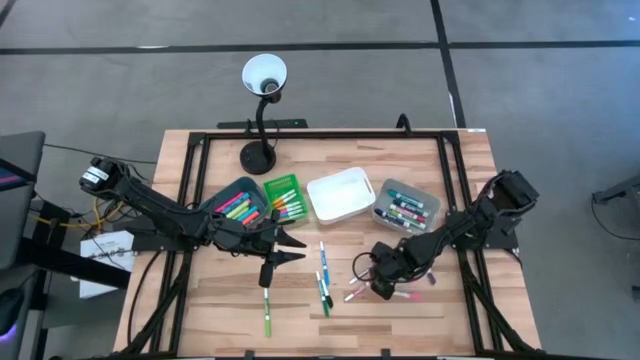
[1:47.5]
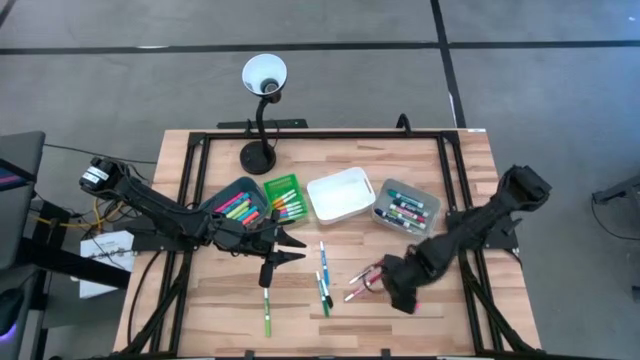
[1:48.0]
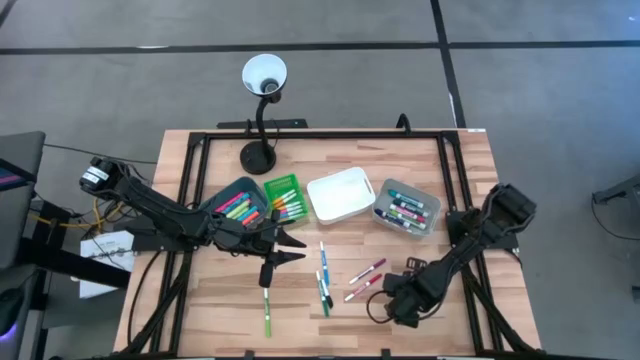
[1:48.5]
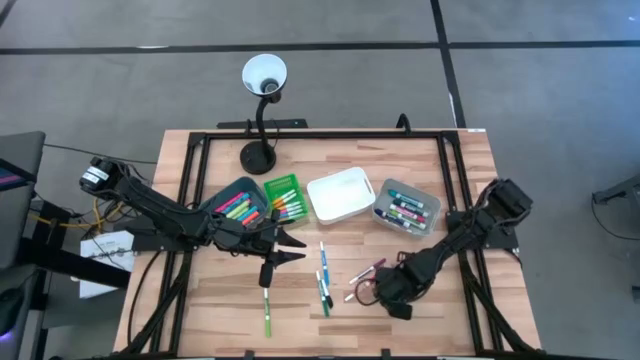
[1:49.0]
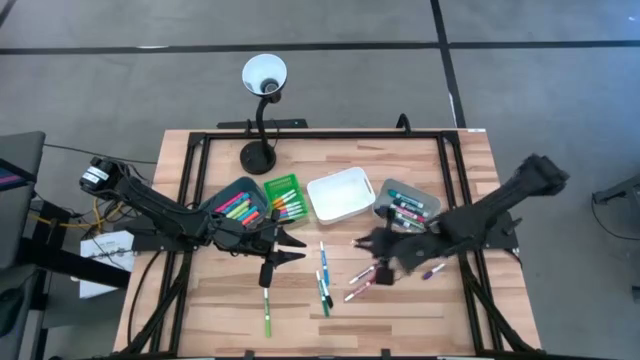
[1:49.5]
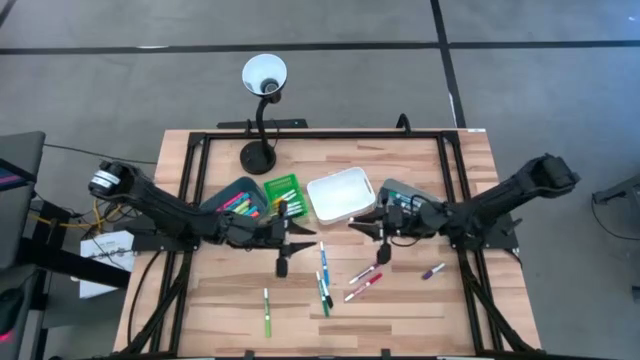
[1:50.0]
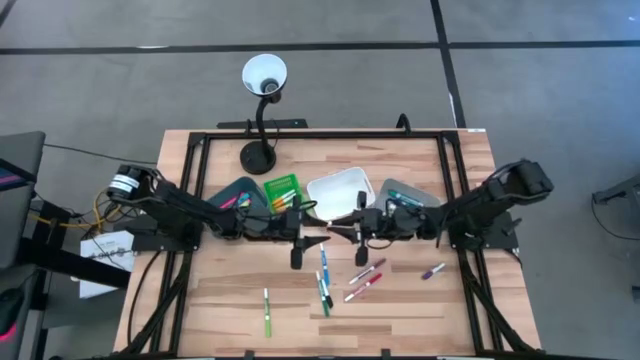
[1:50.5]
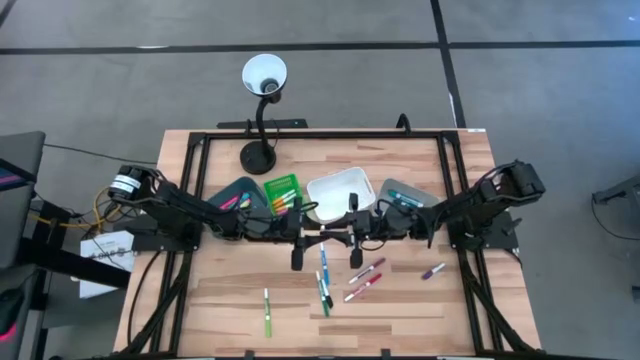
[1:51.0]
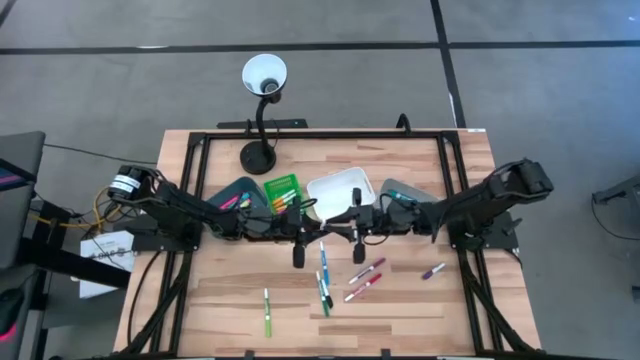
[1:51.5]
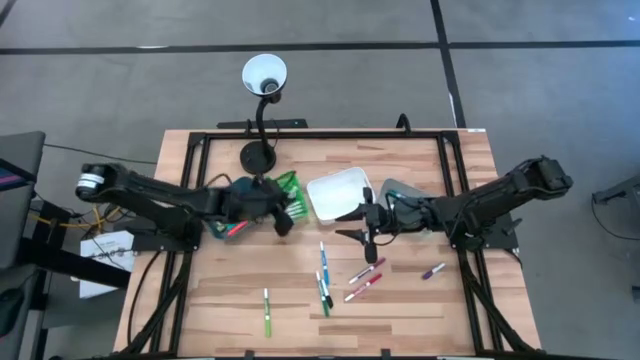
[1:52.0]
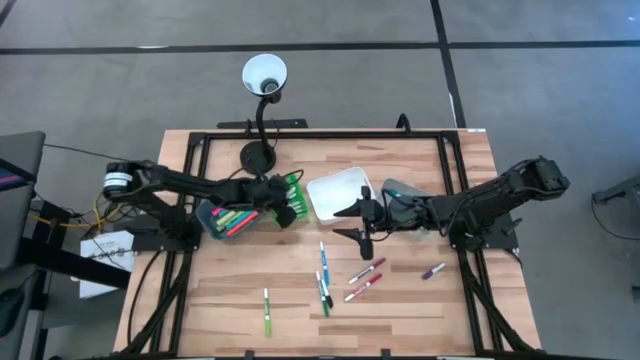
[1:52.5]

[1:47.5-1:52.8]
Task: Pick & Place Markers
Put the pink and white highlighter pen into the green bin

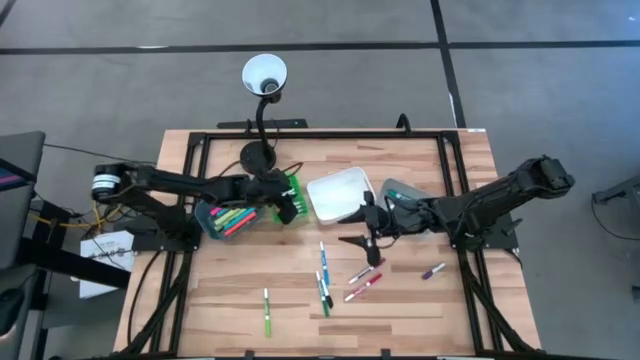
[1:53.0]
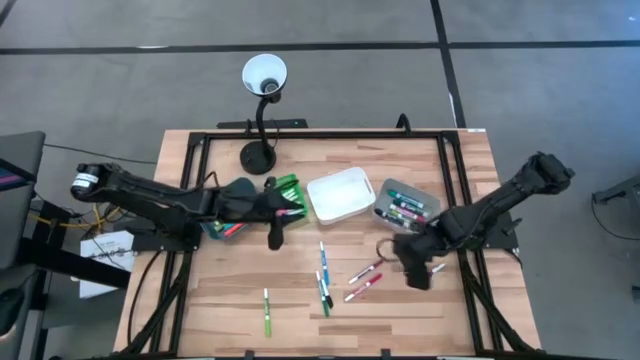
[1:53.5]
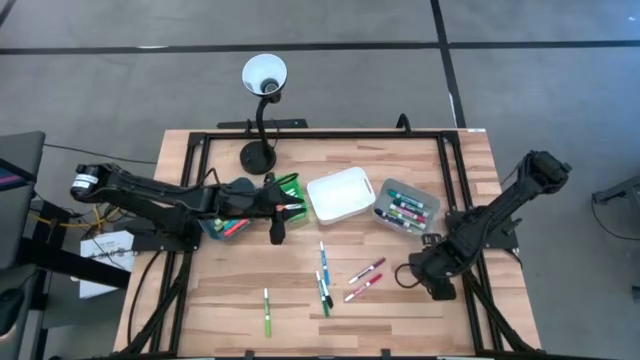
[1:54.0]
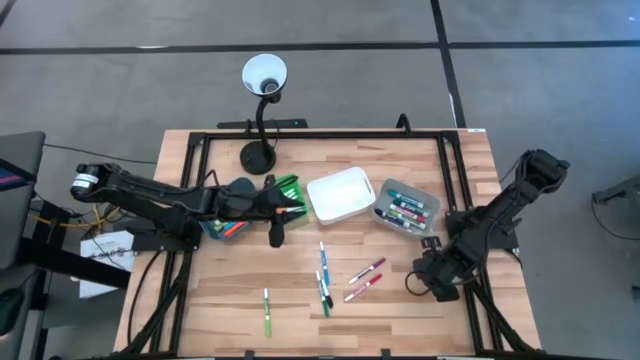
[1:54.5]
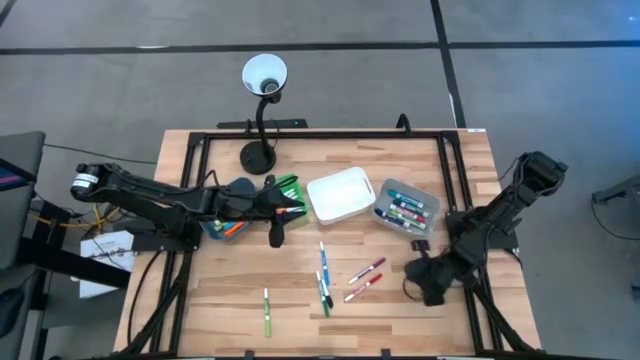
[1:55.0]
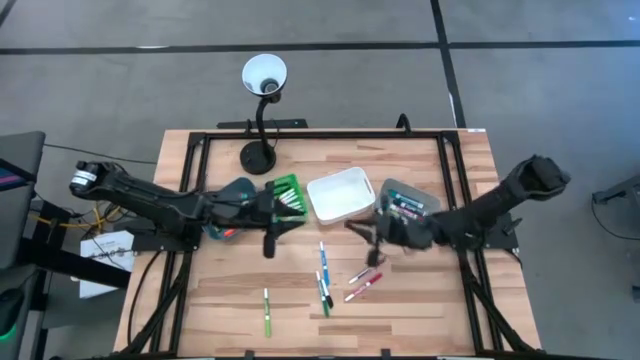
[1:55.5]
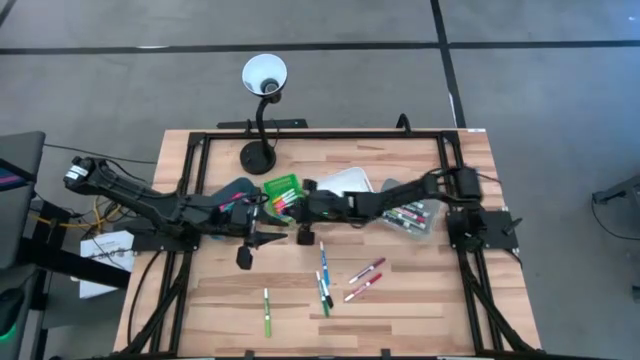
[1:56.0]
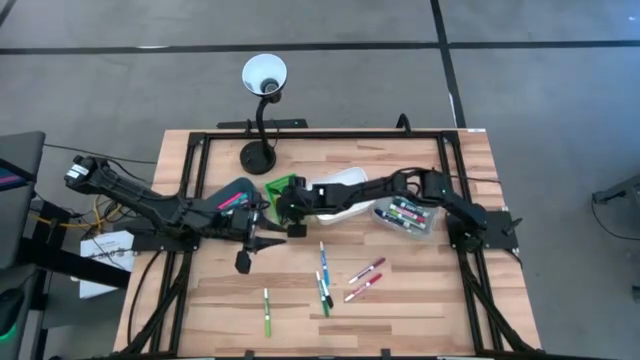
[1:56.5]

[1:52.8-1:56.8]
Put the purple and white pen into the green bin

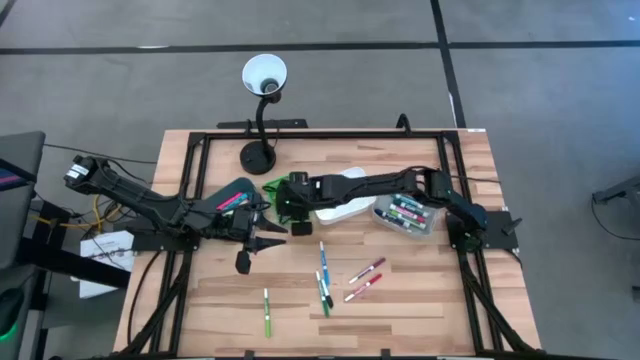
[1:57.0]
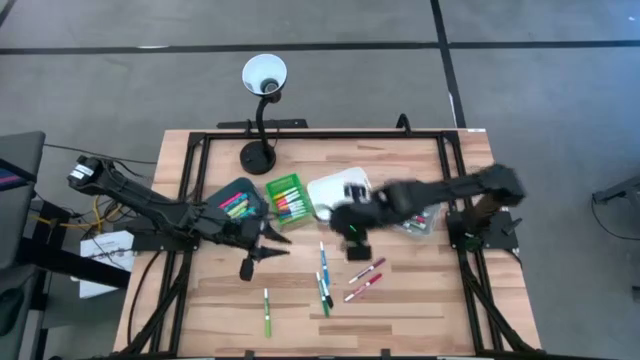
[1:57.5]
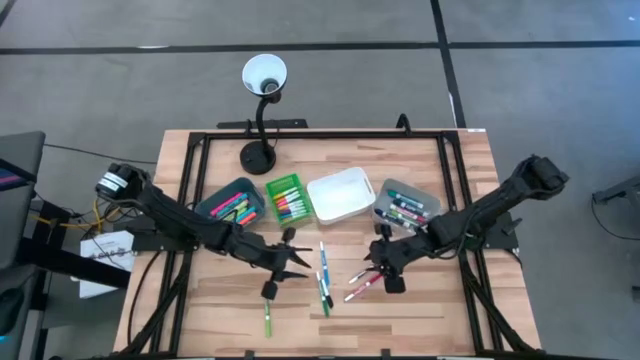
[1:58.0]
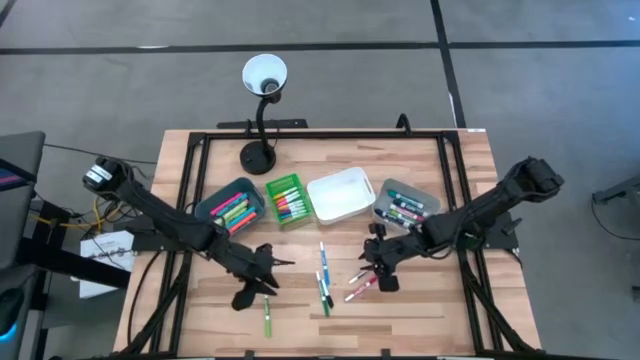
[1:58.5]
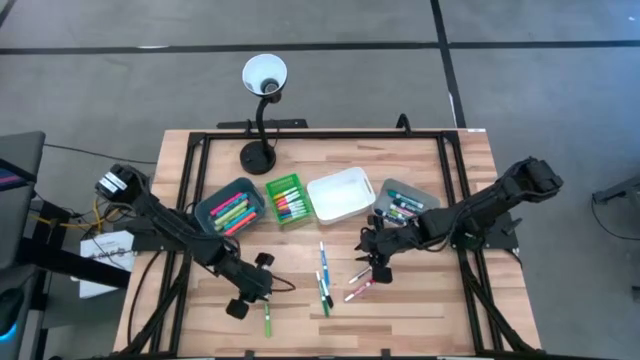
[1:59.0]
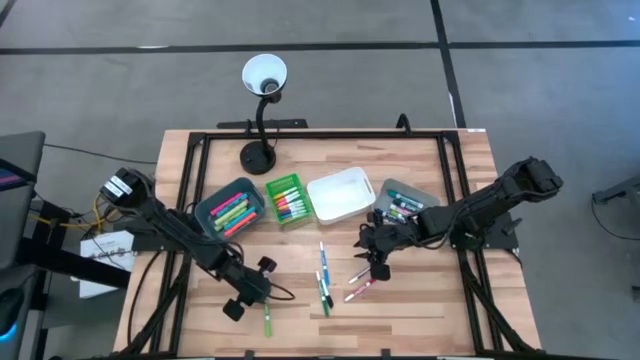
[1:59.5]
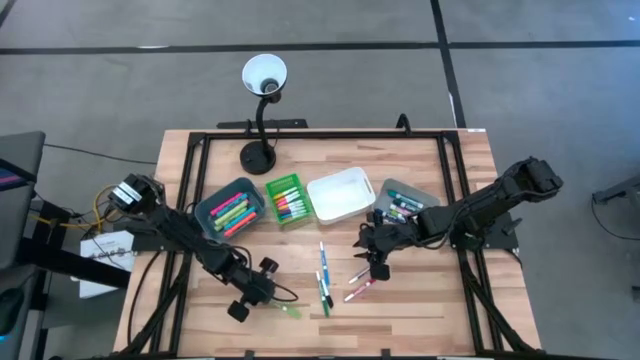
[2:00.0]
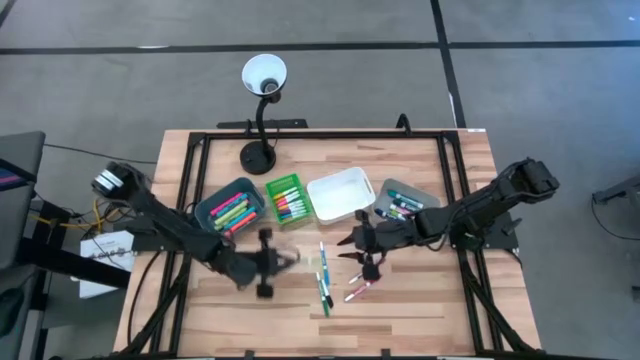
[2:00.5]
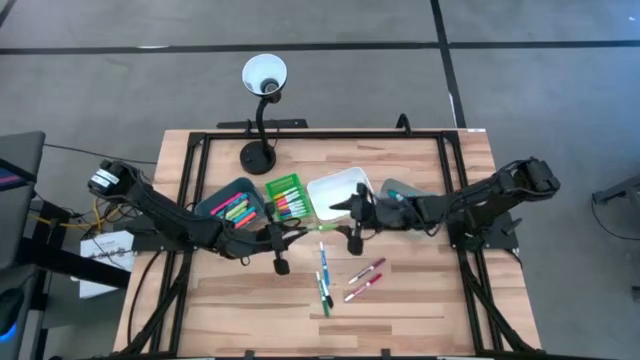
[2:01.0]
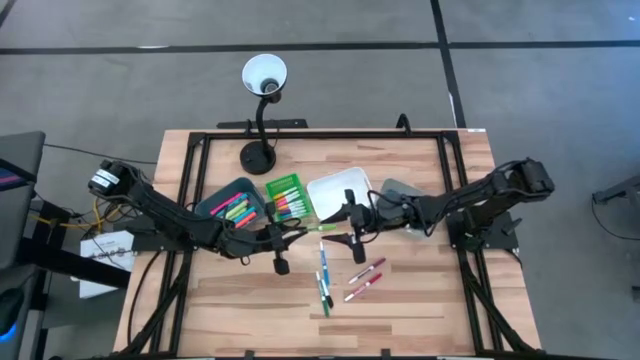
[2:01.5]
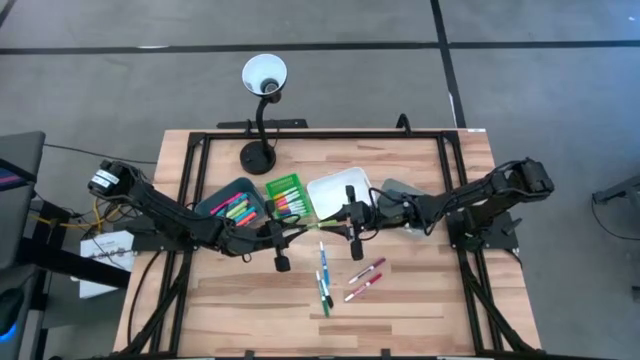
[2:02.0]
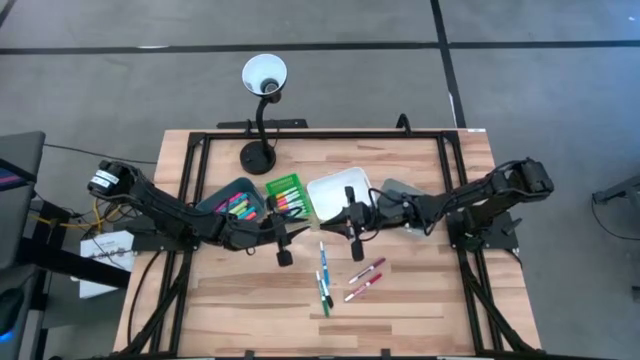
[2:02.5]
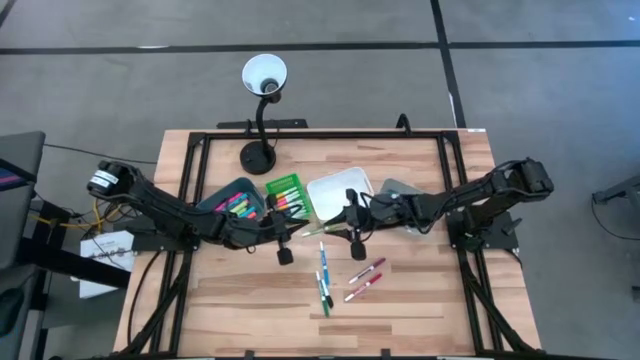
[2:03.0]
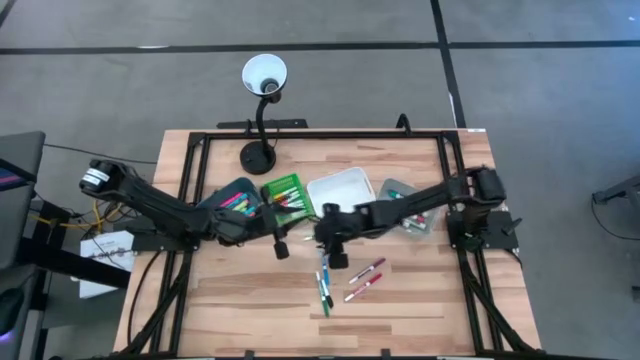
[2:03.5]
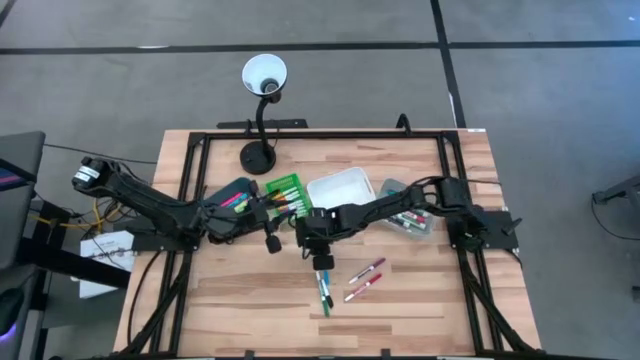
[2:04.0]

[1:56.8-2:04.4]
Put the light green marker pen into the white bin

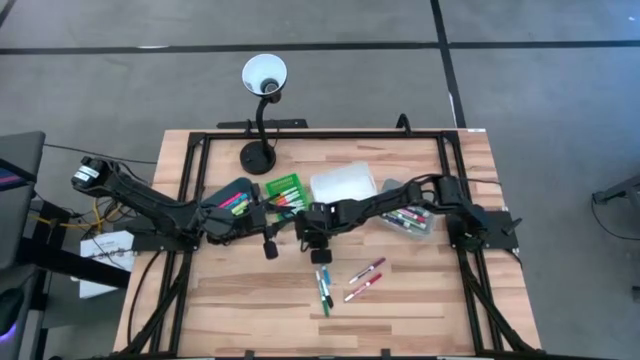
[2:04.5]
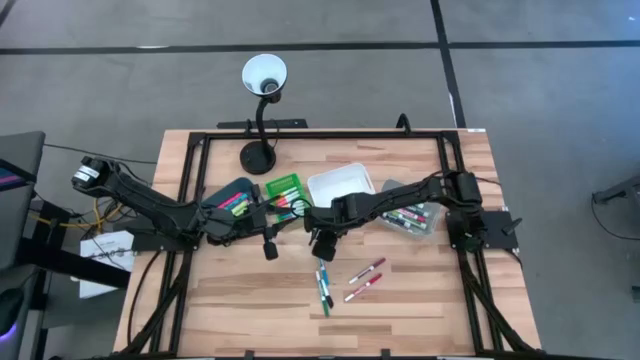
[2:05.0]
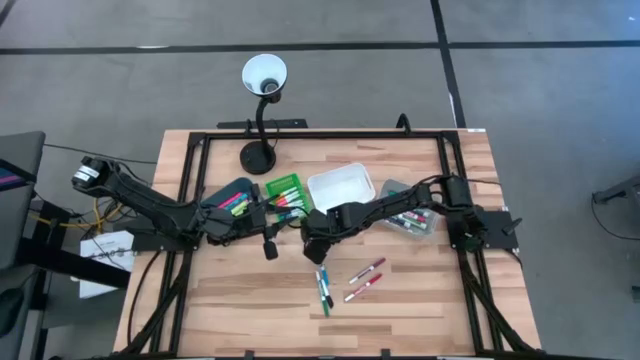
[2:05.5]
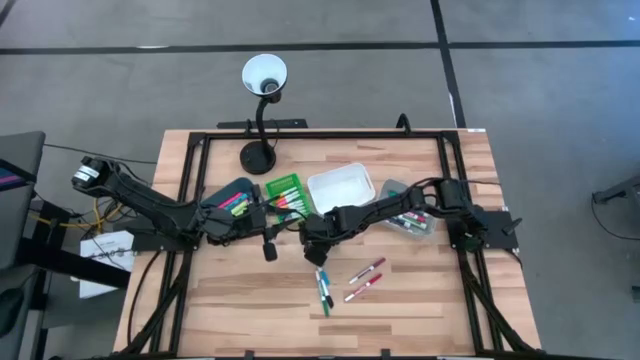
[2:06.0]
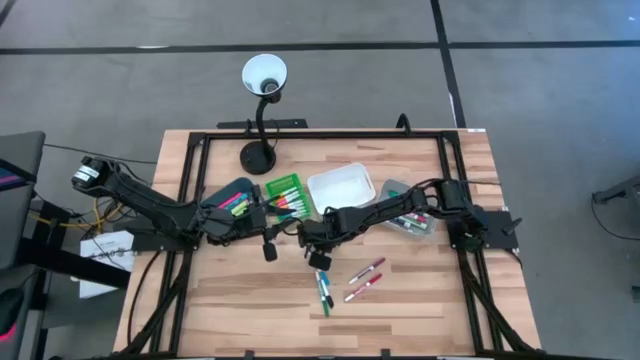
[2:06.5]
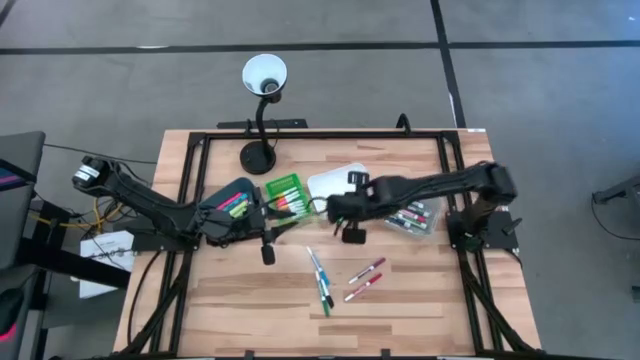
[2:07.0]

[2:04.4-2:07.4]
Put the light green marker pen into the white bin

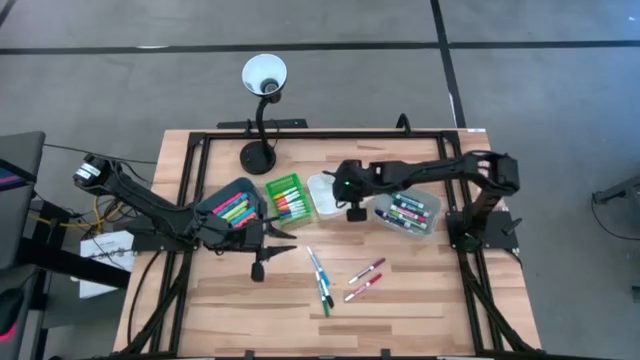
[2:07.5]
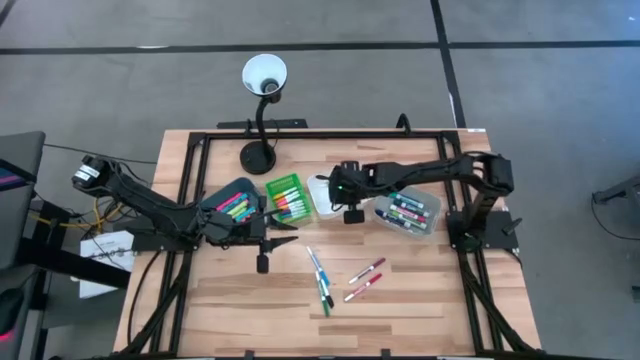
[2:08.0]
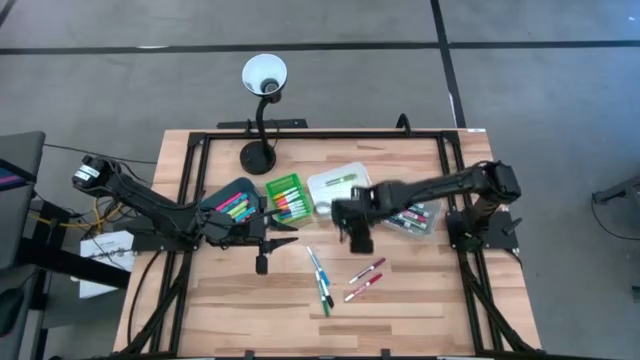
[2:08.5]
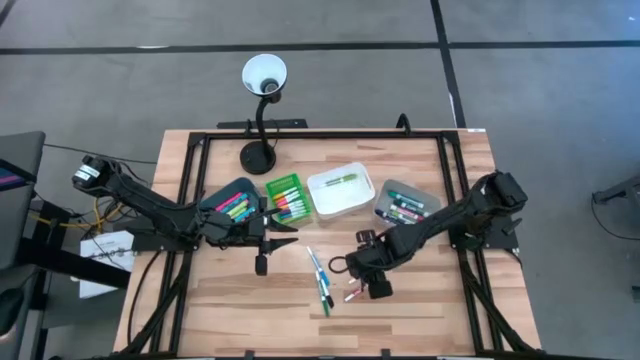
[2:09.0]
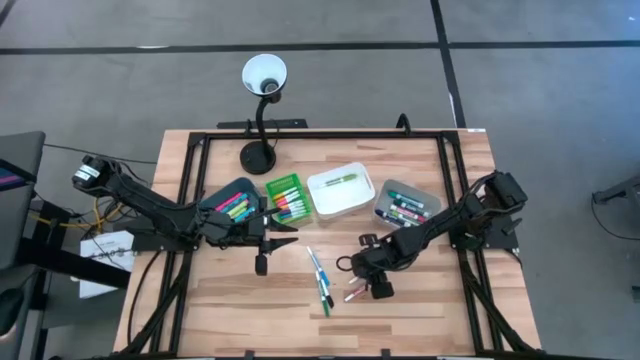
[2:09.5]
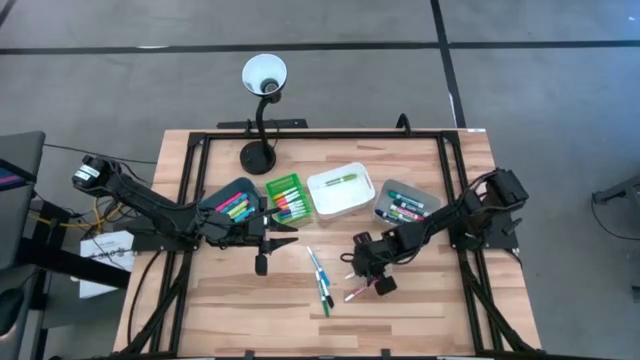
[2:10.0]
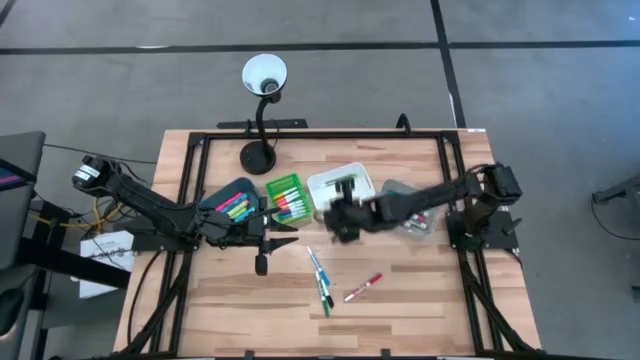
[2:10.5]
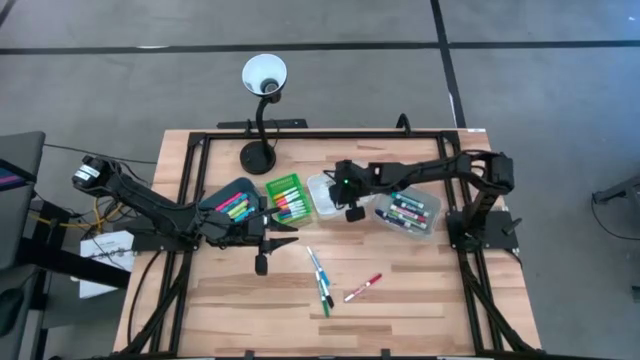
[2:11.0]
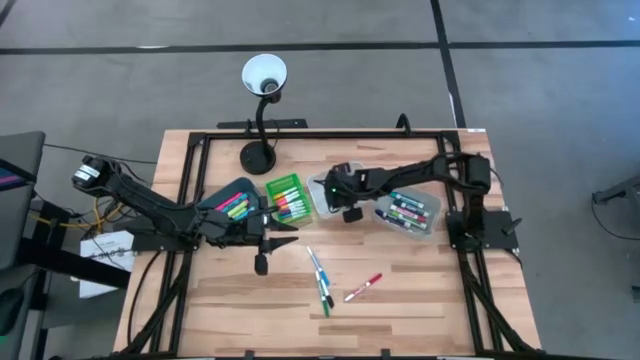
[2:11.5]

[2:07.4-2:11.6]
Put the purple marker pen into the white bin
